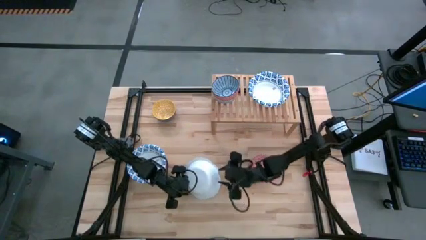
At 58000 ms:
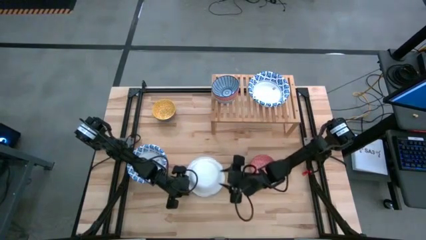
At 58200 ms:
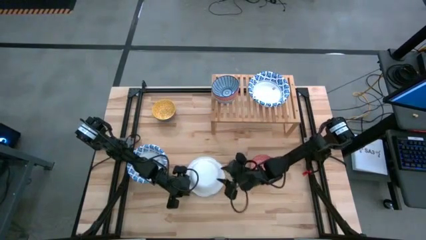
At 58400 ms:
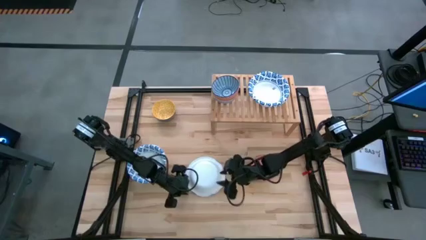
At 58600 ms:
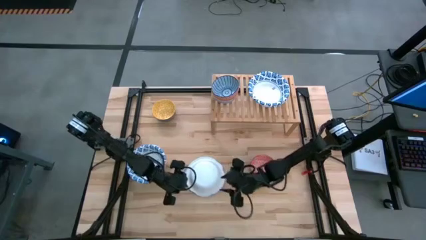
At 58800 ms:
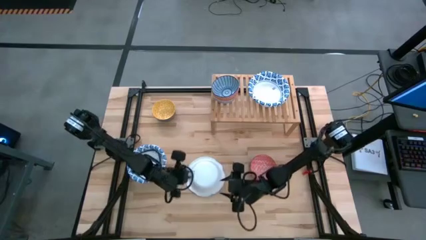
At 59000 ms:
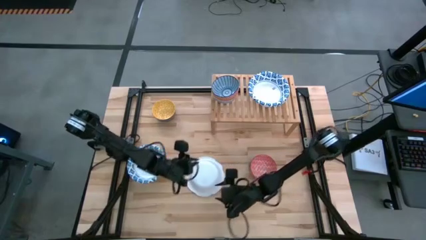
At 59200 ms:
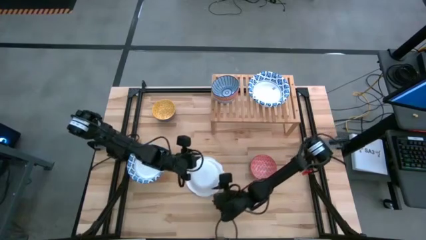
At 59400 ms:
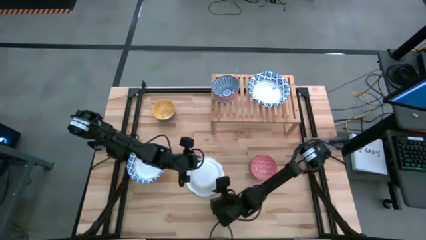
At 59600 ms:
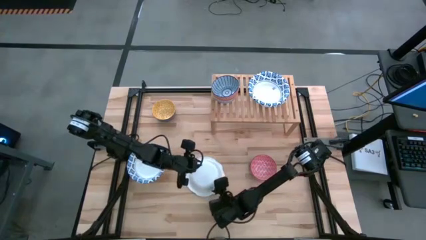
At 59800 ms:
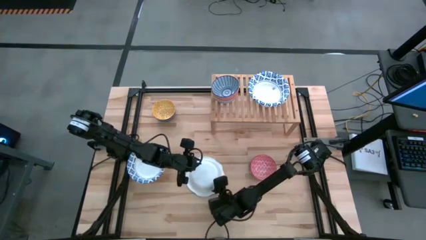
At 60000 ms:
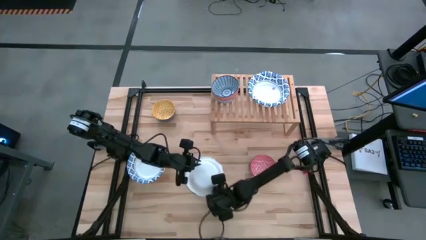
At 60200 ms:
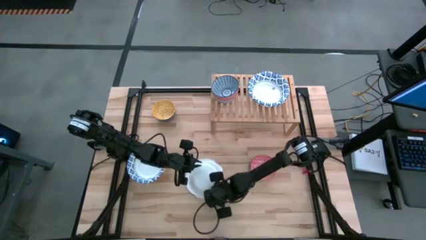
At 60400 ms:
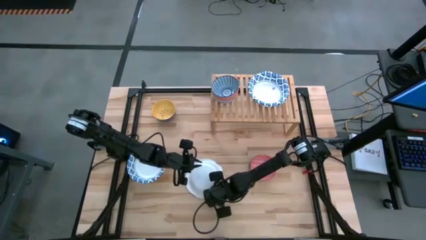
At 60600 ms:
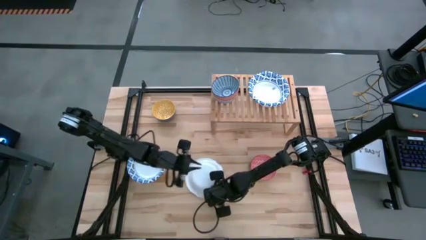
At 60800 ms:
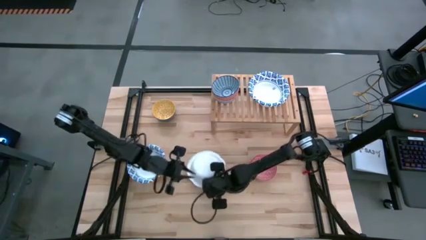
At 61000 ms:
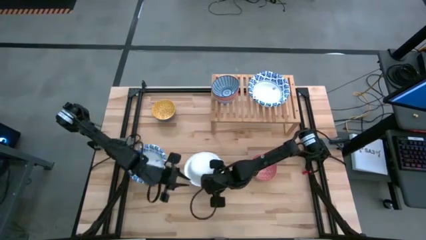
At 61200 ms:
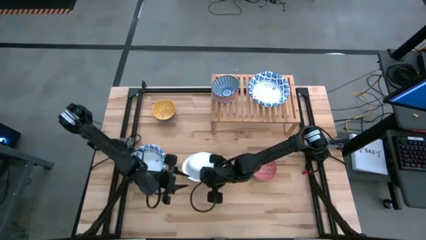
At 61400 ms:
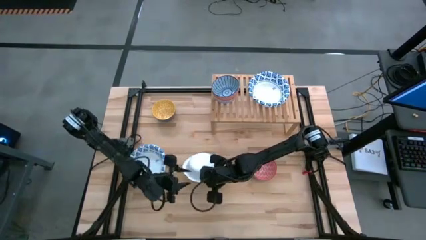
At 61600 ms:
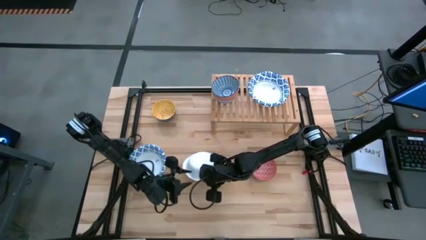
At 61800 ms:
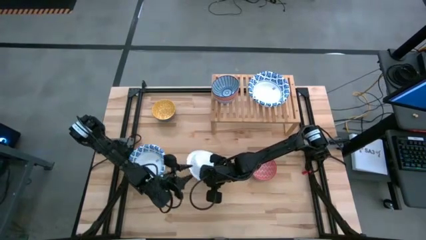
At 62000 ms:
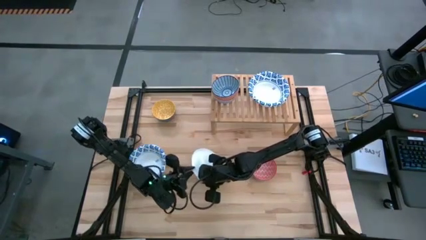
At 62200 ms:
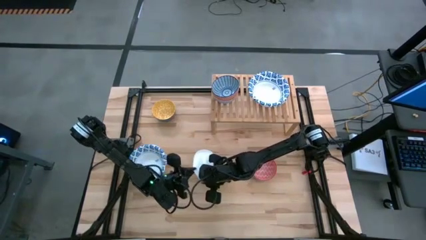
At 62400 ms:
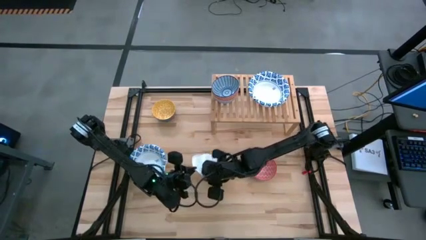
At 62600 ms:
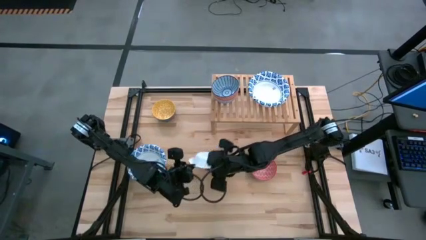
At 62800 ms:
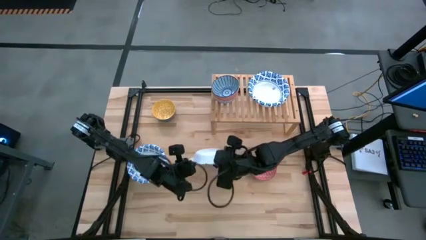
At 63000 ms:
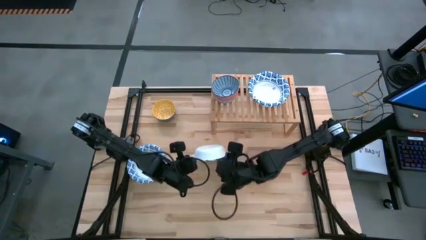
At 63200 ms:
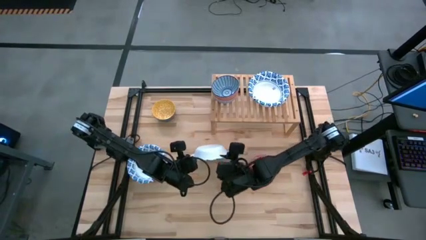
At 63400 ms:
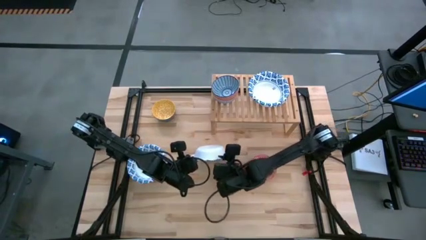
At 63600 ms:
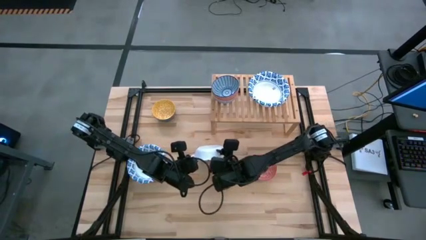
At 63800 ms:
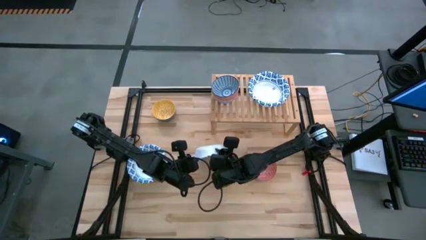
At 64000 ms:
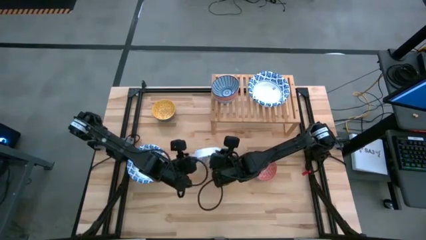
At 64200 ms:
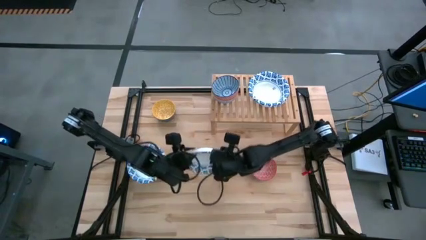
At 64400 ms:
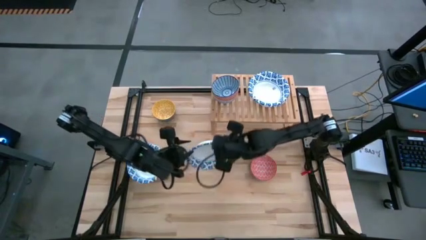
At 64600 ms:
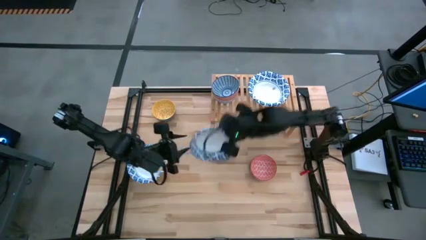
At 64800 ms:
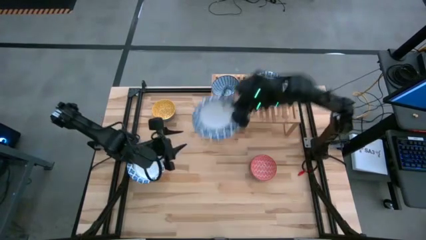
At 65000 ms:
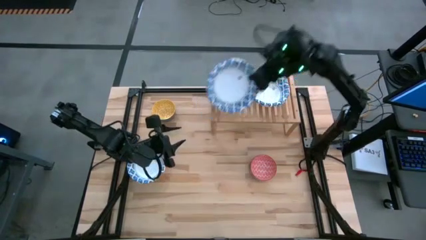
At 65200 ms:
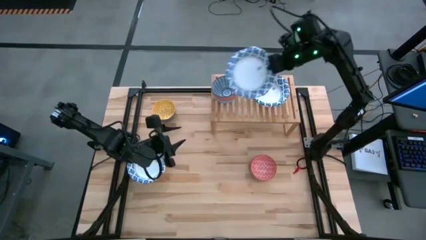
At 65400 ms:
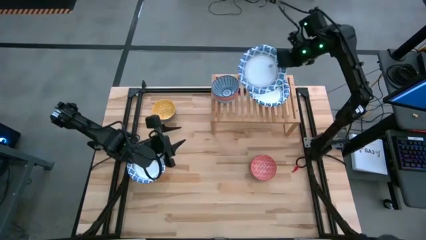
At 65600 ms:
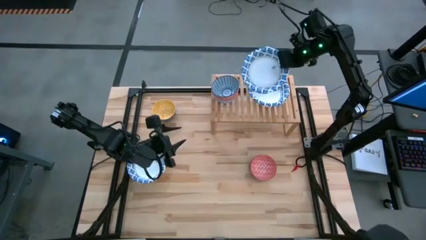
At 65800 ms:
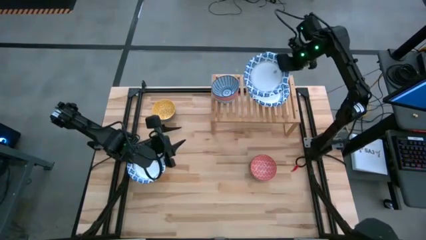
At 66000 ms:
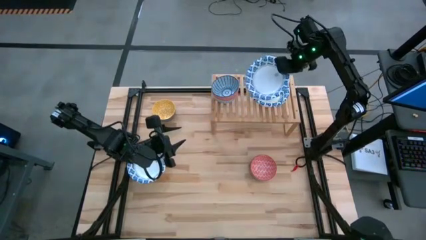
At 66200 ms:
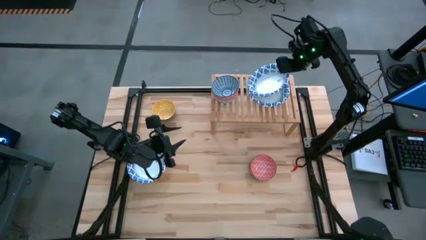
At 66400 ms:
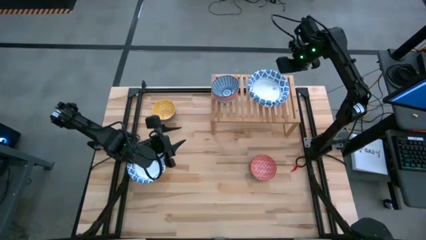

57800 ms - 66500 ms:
Task: Place and stack bowls onto a shelf
Stack the white patterned bowl on top of the white patterned bowls on the shelf

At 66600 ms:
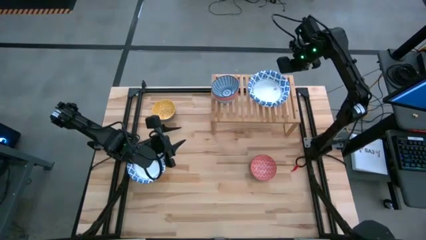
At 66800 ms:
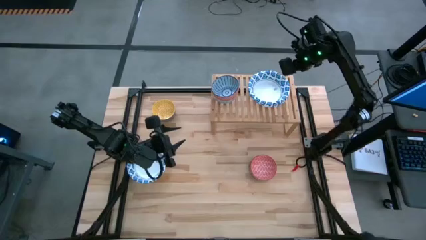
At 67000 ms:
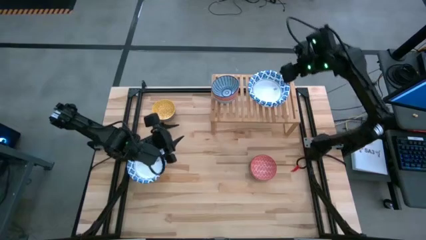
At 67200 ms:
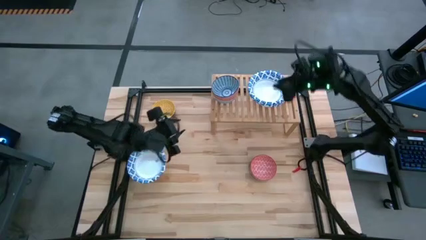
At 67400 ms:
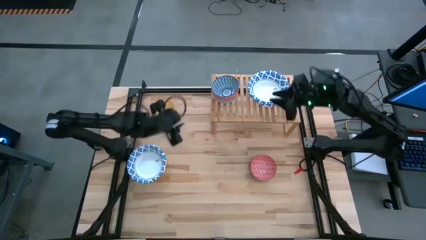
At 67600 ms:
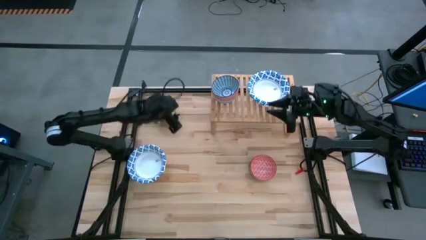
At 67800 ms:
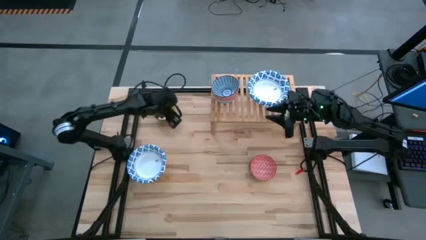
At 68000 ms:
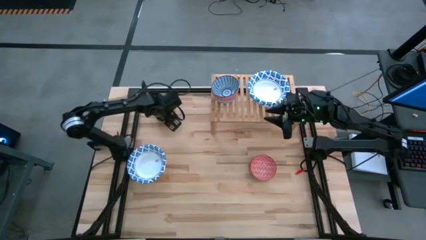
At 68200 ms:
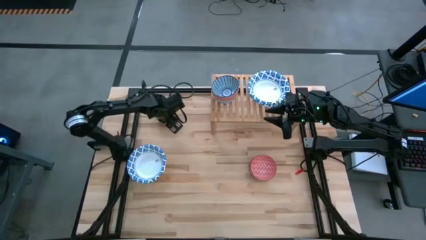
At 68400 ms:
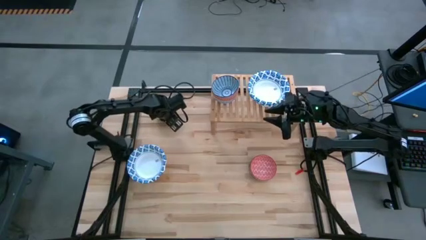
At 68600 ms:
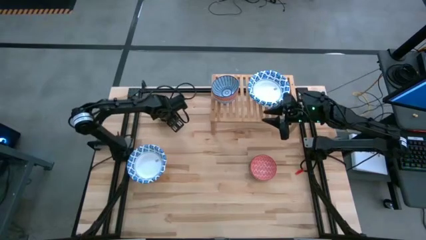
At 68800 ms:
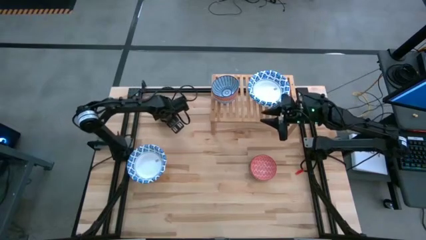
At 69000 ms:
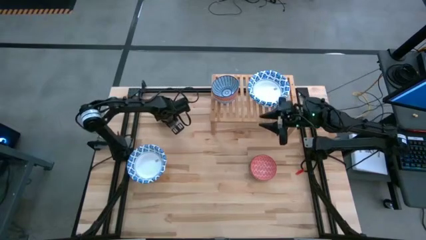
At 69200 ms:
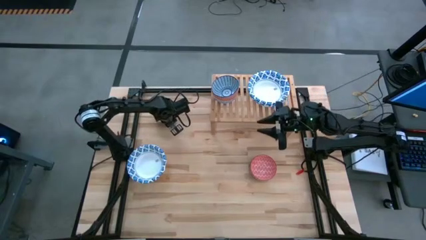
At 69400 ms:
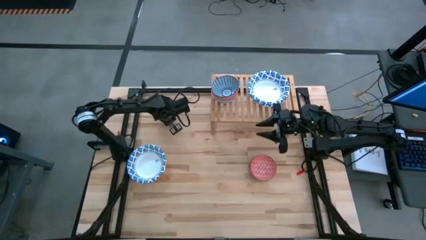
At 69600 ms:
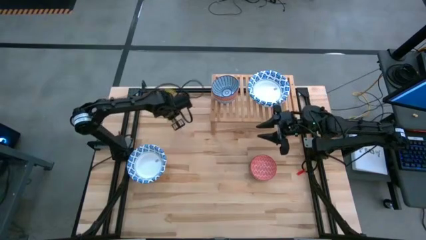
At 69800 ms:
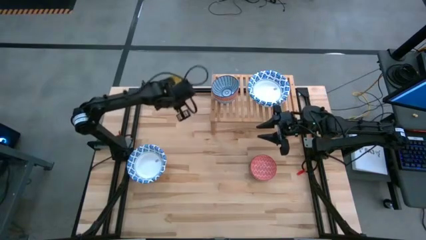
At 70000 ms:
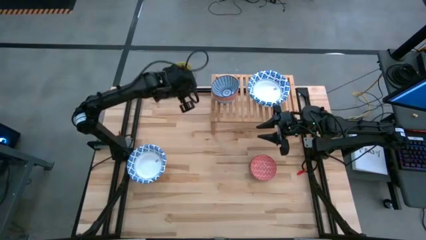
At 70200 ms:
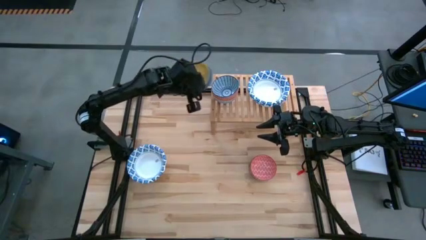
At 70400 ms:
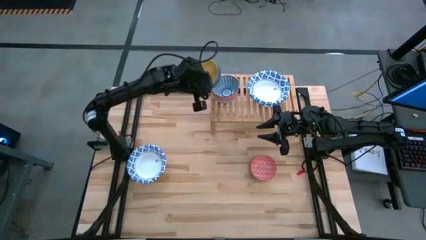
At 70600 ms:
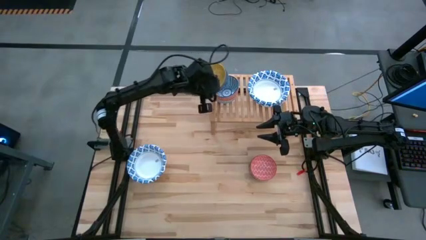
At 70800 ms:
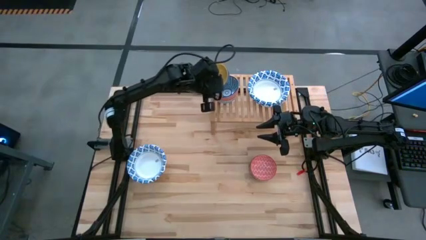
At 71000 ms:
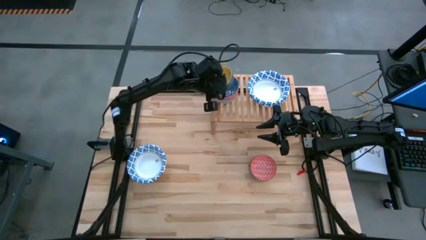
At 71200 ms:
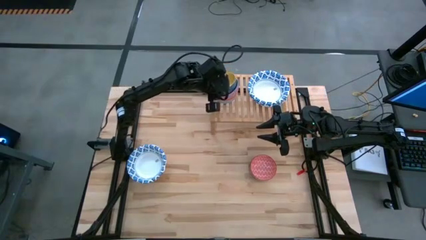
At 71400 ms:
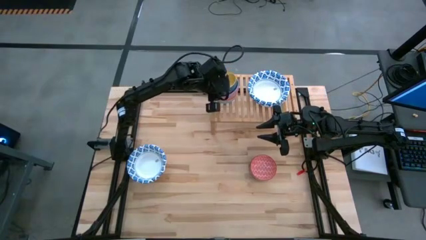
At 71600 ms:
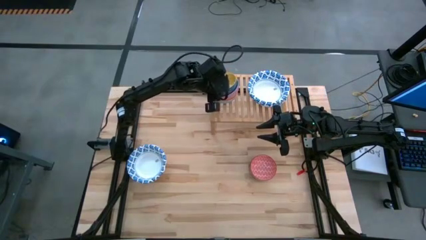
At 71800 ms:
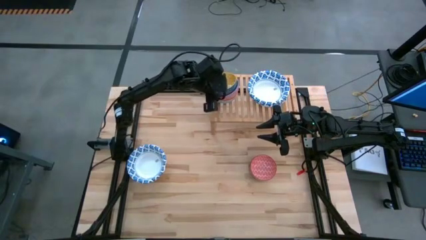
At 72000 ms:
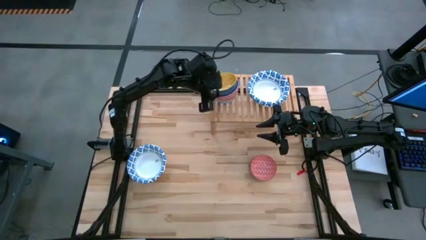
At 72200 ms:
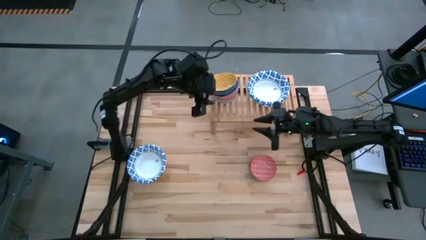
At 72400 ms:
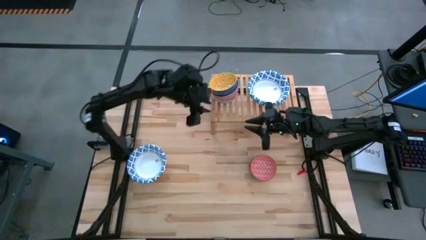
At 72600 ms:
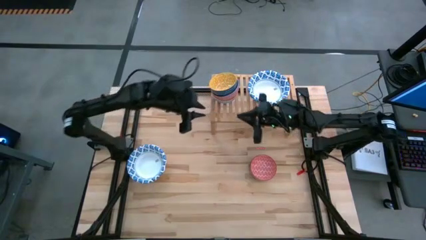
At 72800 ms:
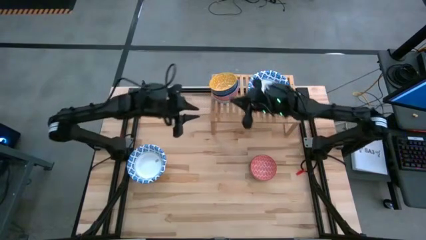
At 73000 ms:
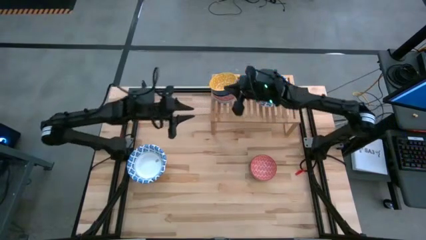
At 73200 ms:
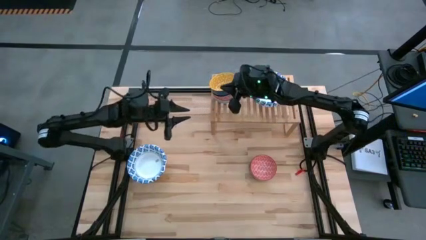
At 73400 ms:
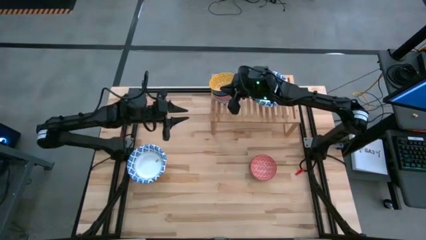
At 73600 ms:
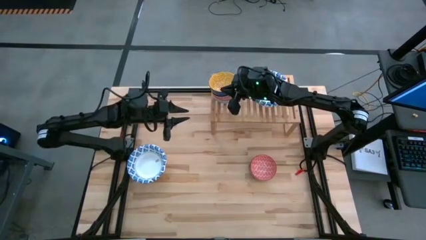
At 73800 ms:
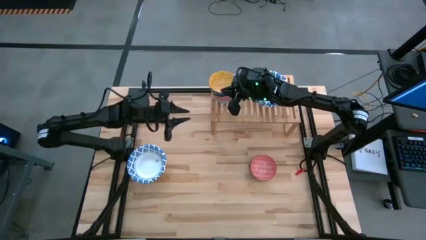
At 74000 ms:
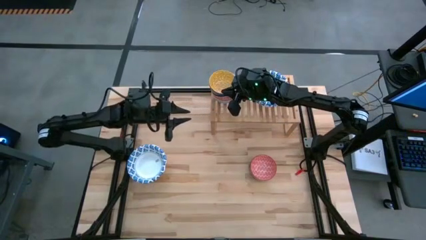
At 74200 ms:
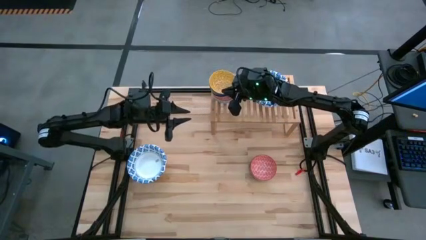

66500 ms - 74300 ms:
Stack the yellow patterned bowl on top of the blue patterned bowl on the shelf
